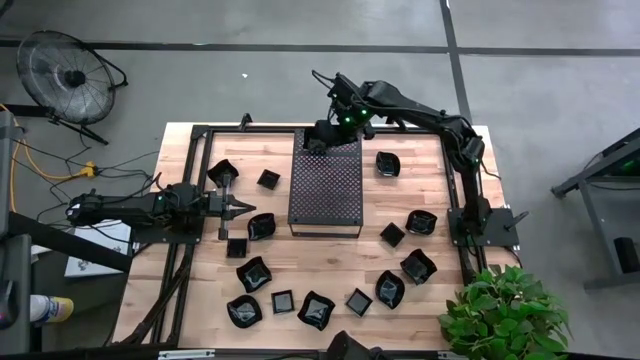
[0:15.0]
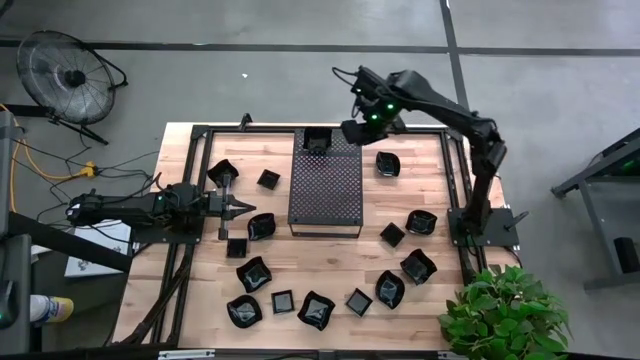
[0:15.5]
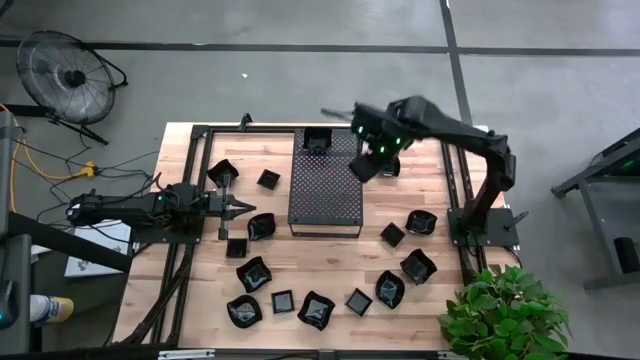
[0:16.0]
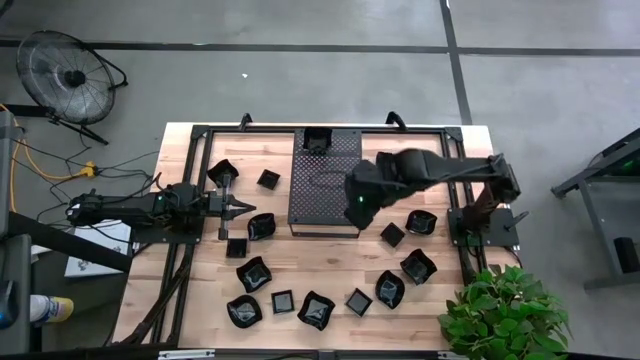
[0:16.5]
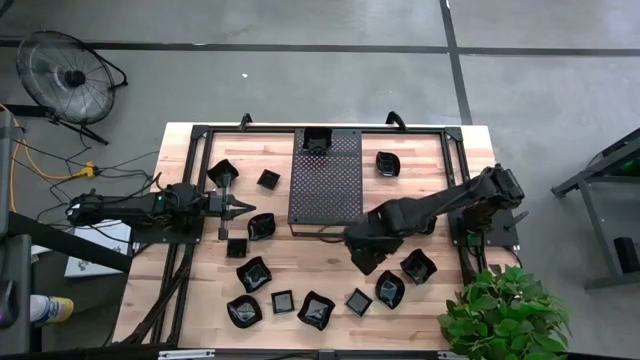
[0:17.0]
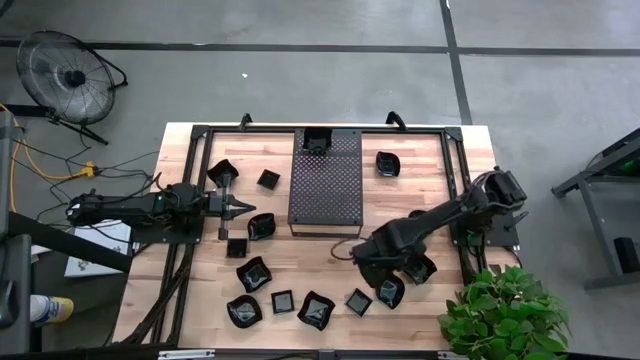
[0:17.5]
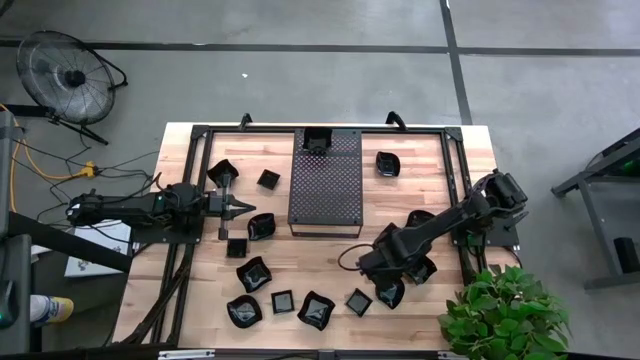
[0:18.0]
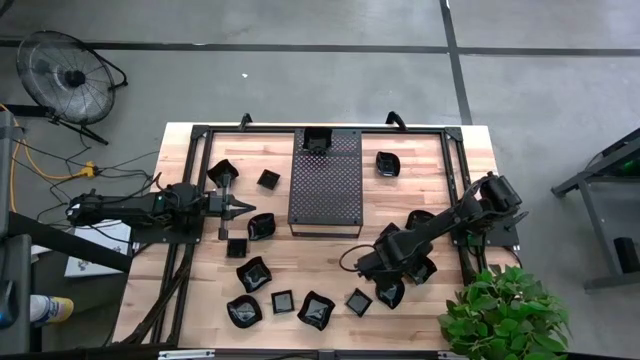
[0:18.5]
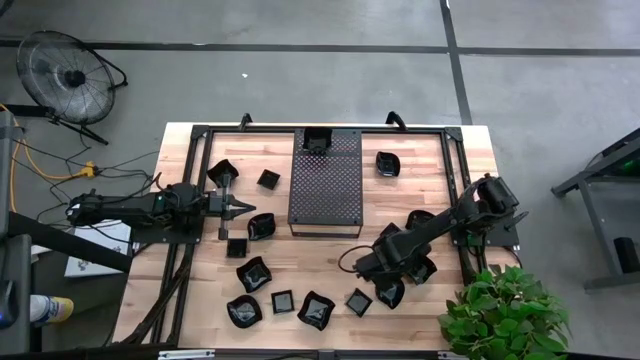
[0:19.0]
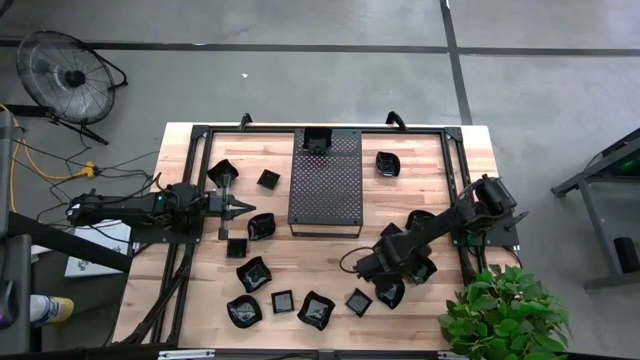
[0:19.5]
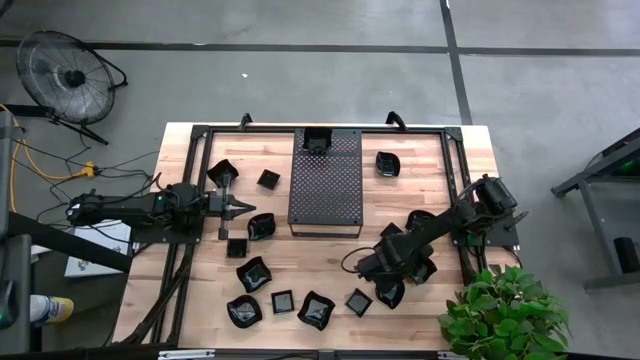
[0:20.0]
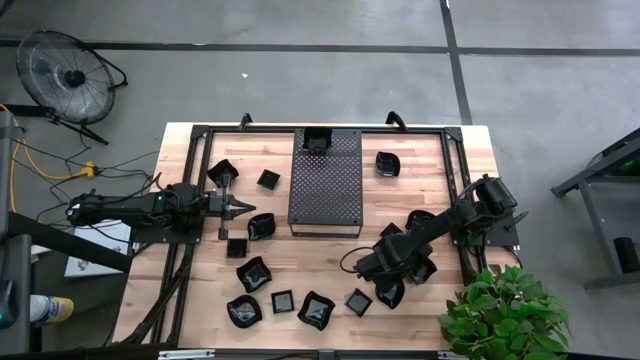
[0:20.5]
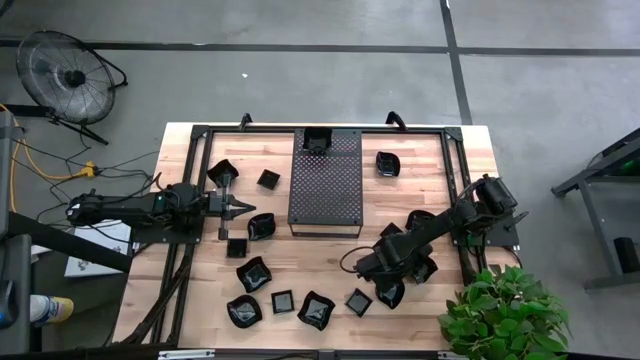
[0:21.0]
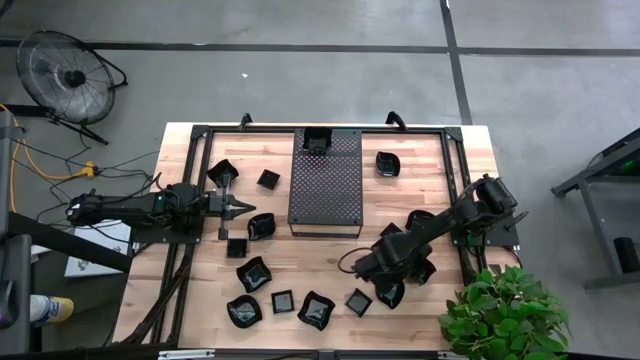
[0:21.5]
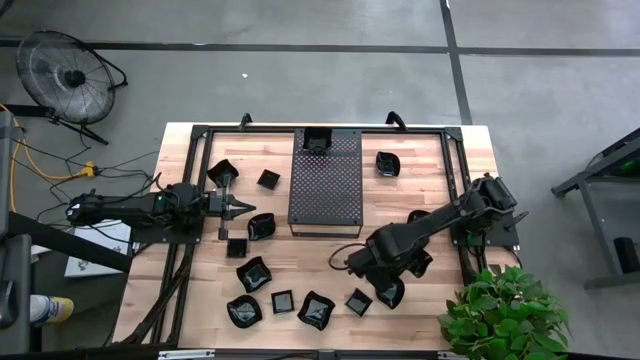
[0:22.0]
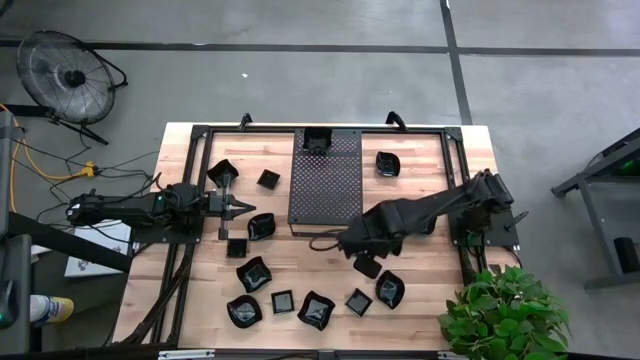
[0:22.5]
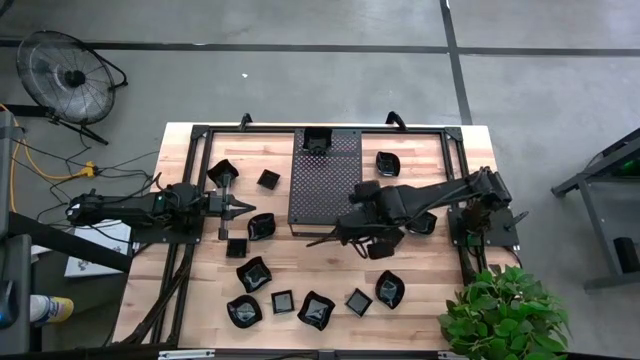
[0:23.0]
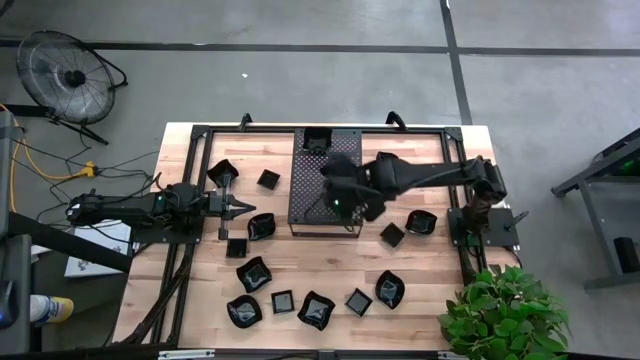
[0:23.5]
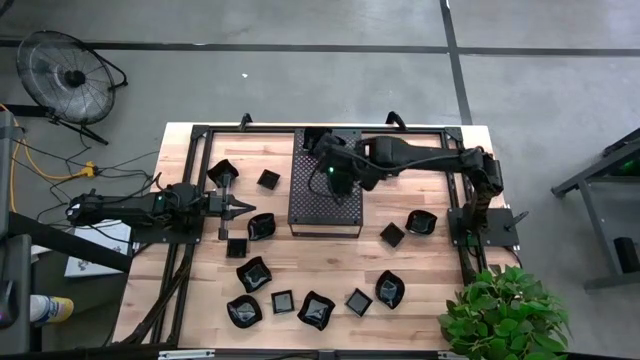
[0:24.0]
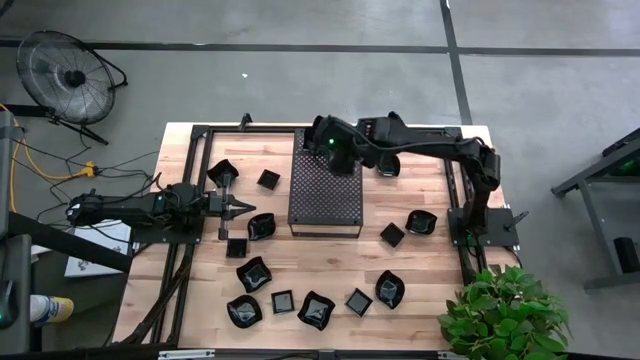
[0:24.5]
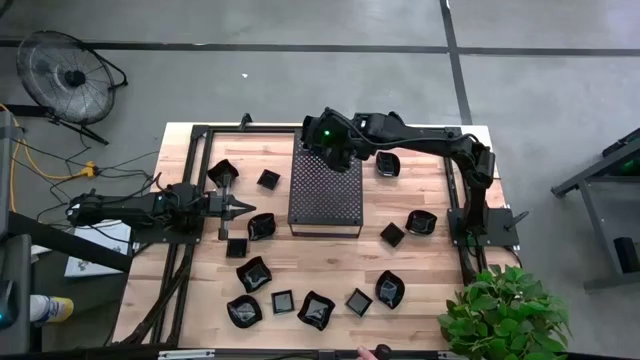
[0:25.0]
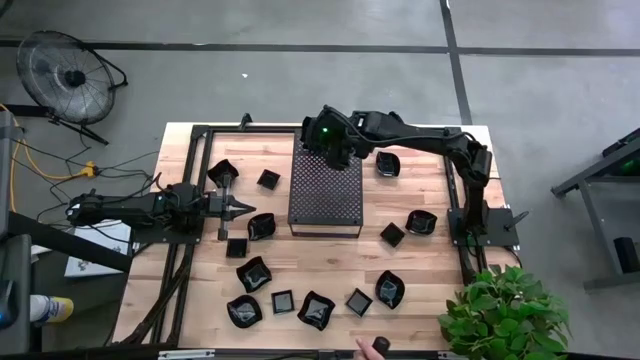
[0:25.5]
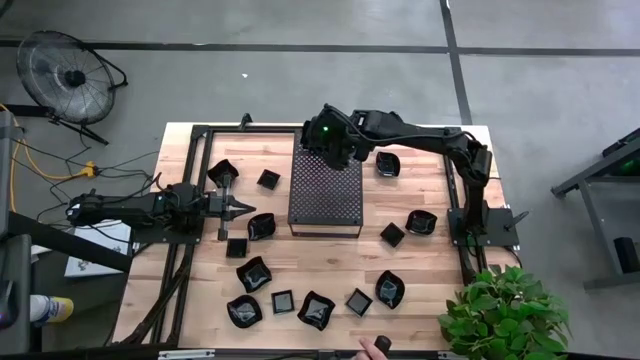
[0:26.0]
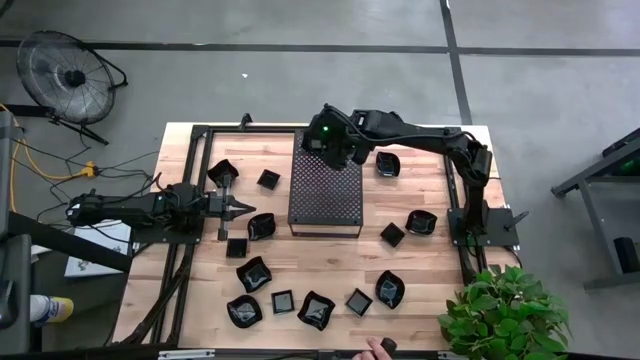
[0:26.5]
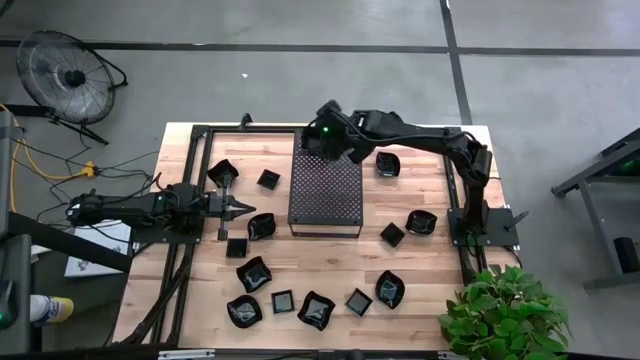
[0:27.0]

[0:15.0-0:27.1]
Task: Pick & Place Mini shaped plates
Stack the black distorted square plate on top of the other black distorted square plate on the shelf

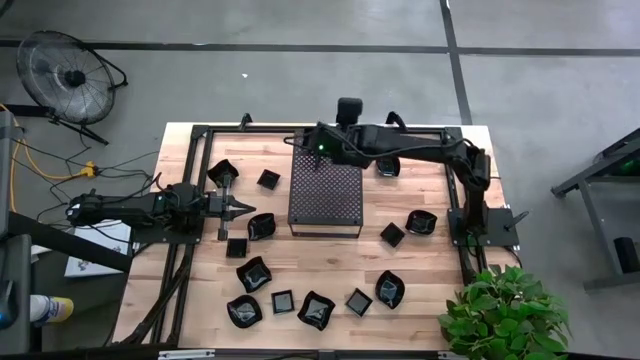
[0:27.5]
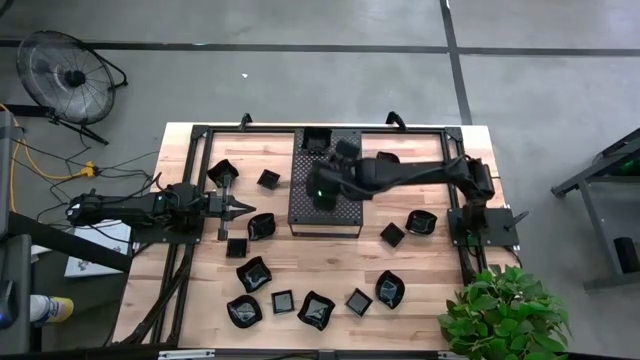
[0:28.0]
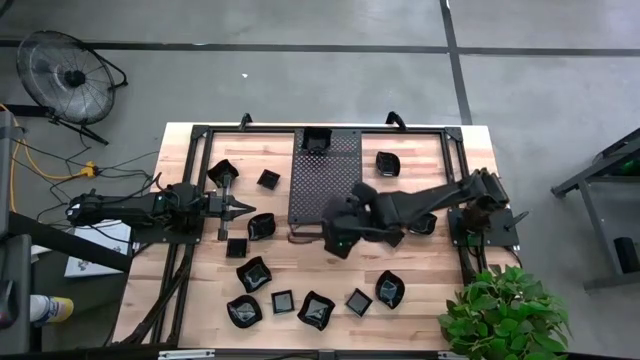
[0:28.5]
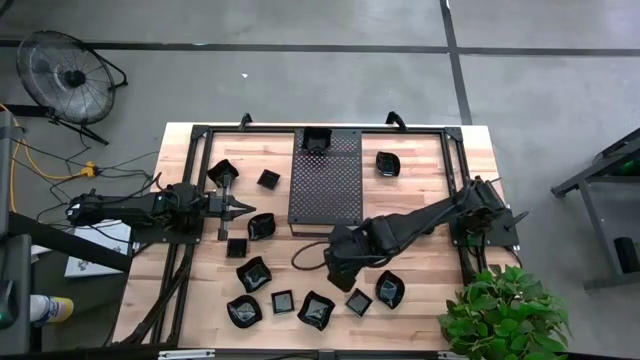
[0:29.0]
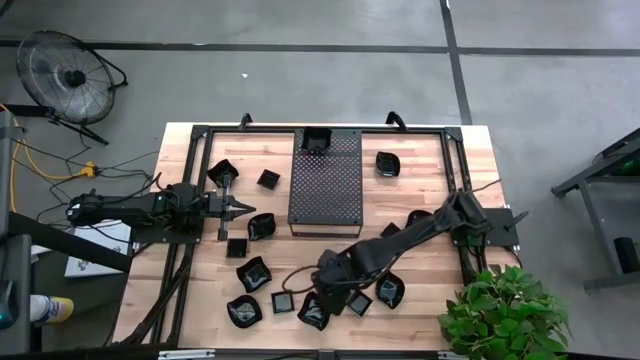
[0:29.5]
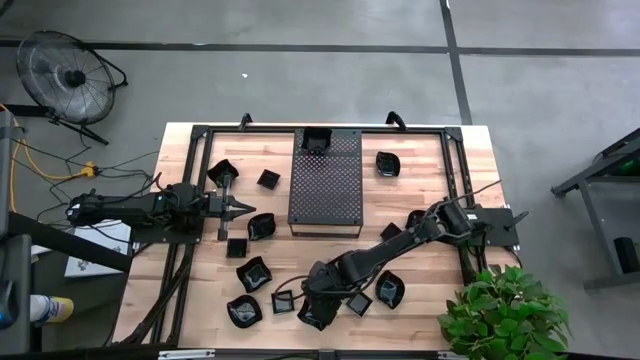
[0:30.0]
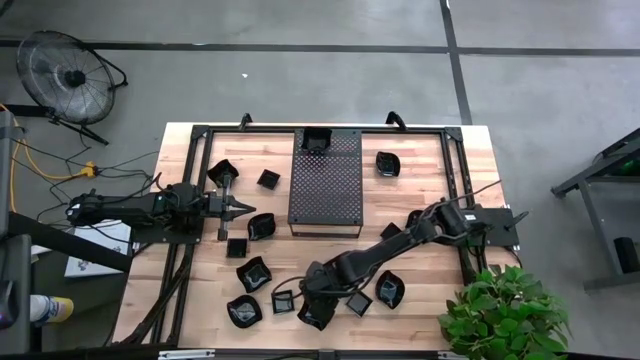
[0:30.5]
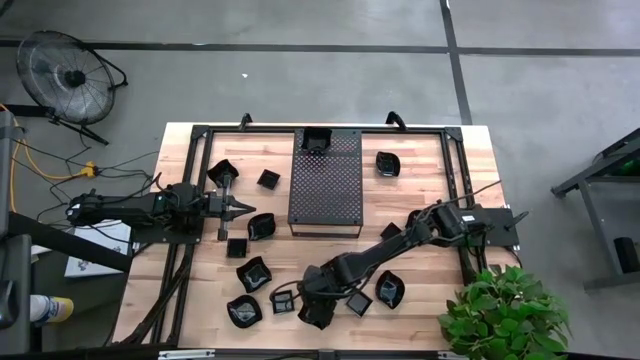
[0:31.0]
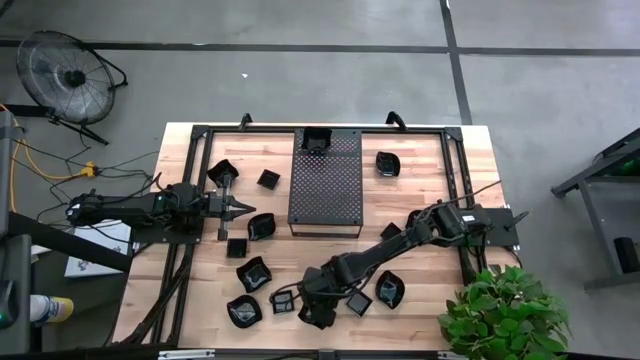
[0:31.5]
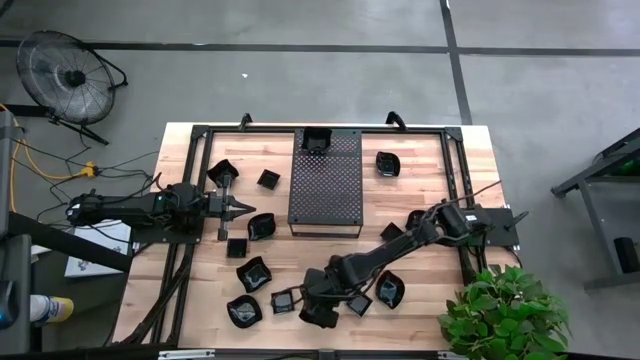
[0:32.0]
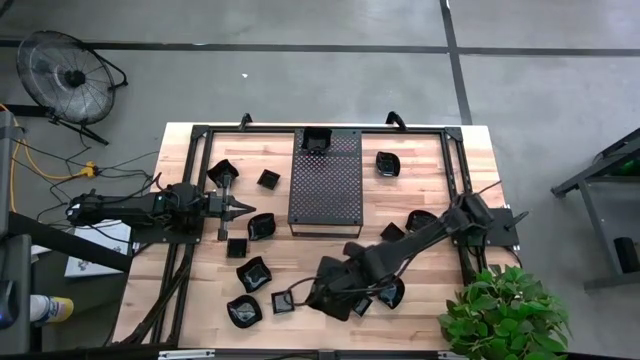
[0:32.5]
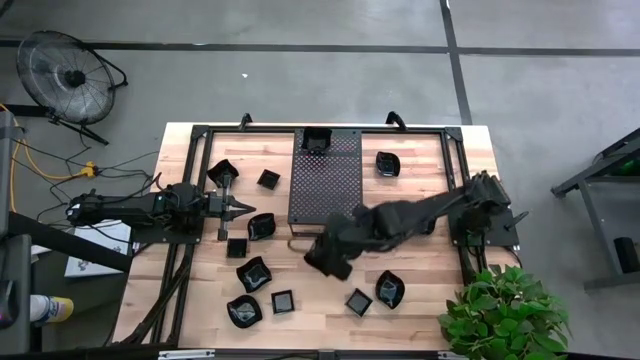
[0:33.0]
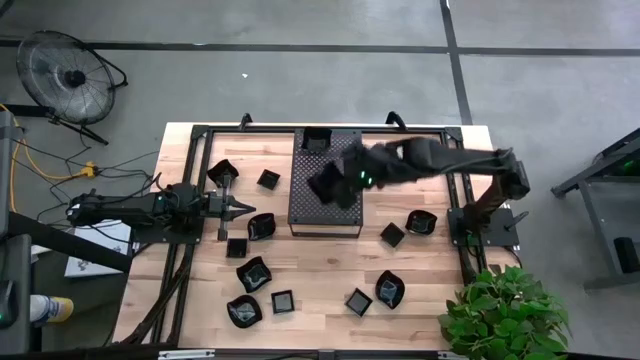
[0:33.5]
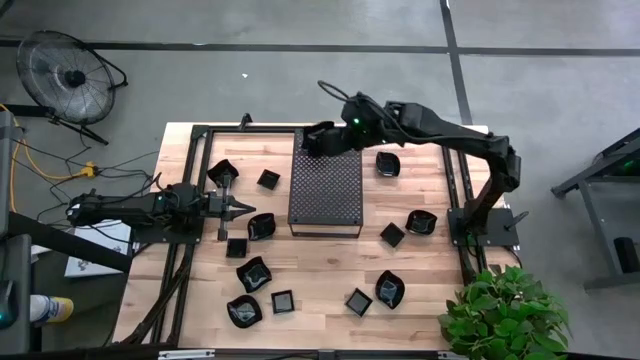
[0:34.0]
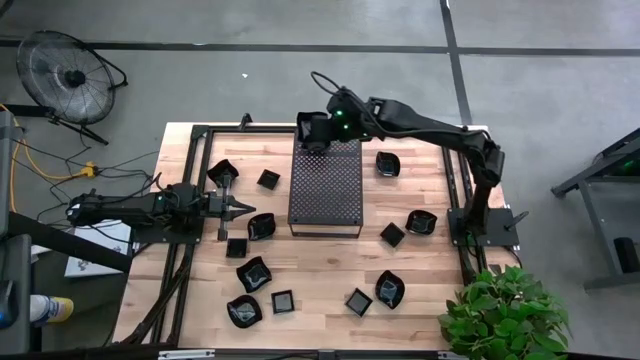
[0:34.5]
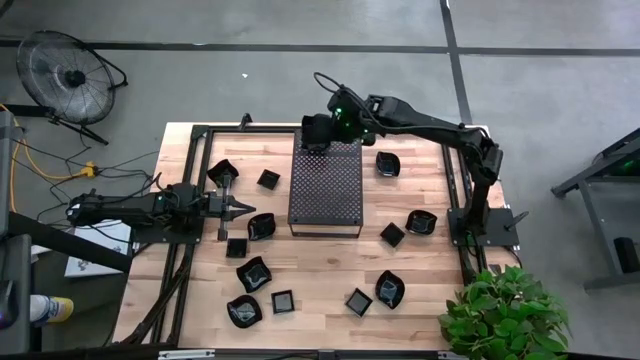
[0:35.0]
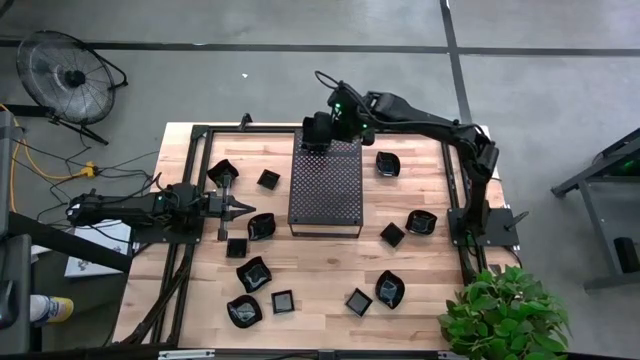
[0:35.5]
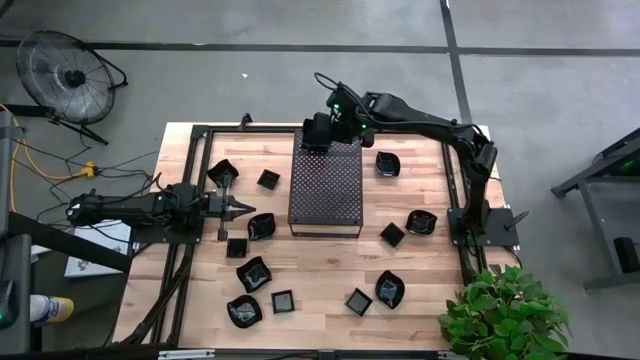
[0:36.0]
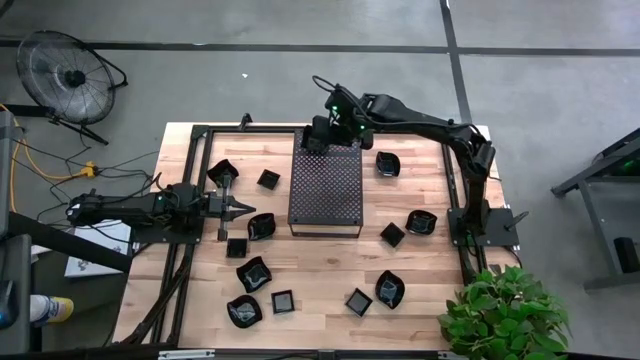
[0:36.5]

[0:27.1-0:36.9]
Stack the black distorted square plate on top of the other black distorted square plate on the shelf

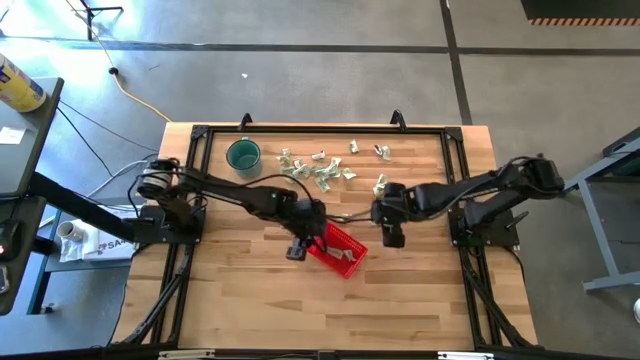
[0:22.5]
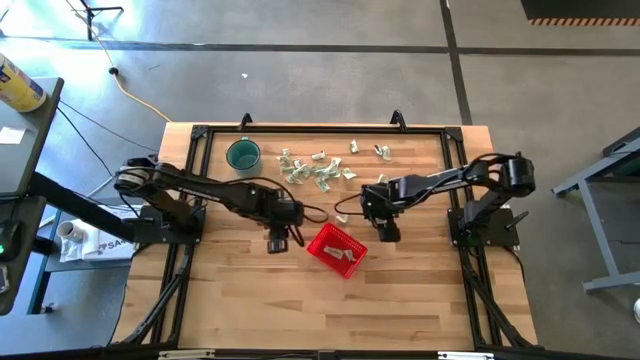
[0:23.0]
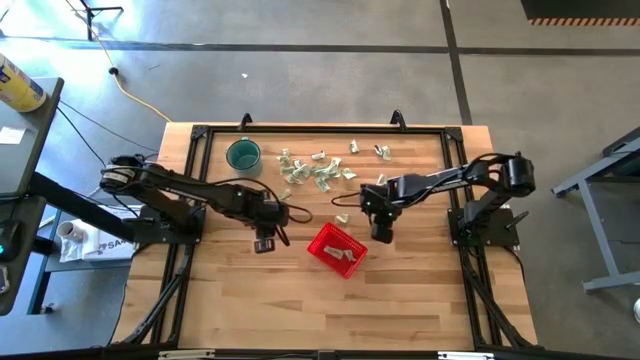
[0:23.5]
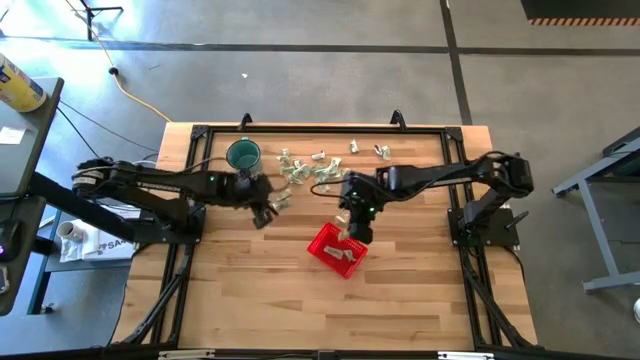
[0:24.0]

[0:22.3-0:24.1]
Task: Pick and place Stevia / Truvia into bins
Put the light green stevia packet into the bin
